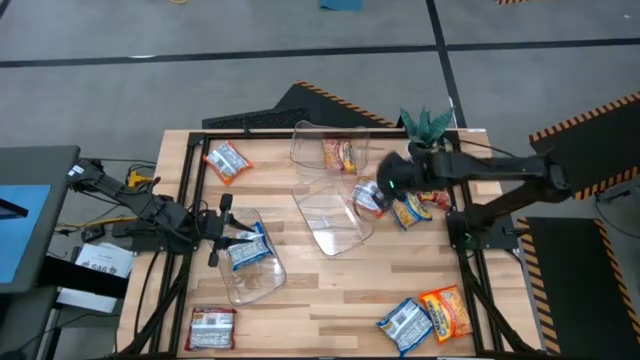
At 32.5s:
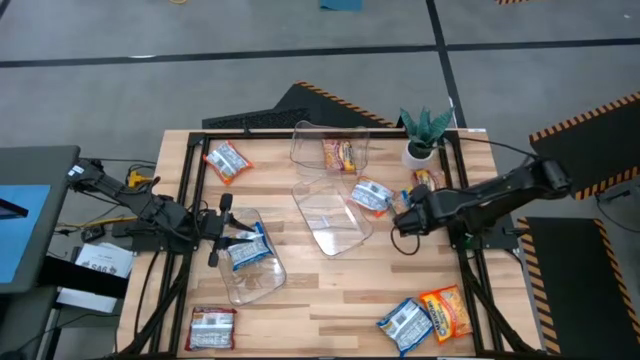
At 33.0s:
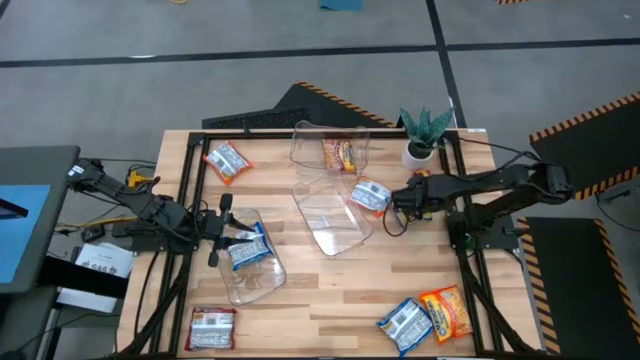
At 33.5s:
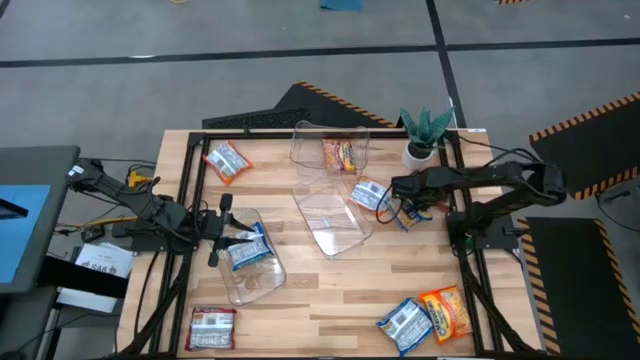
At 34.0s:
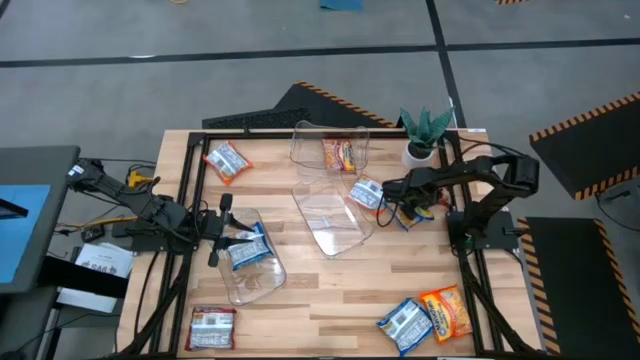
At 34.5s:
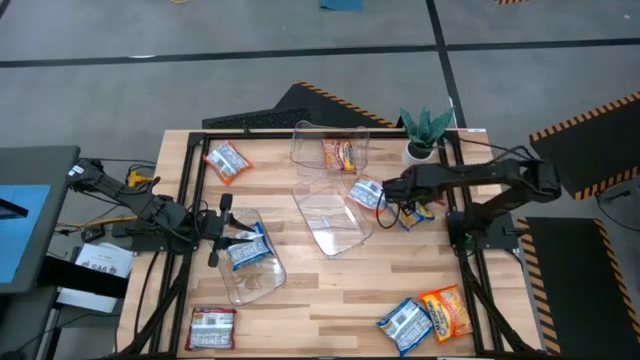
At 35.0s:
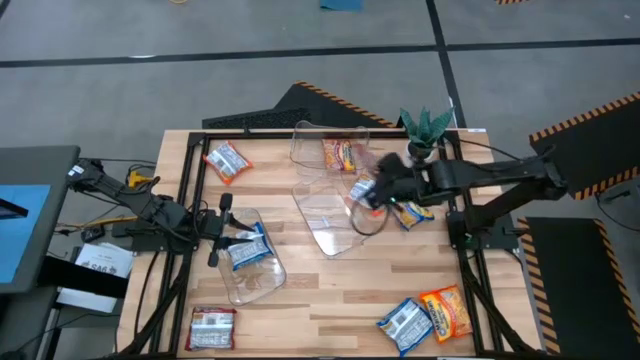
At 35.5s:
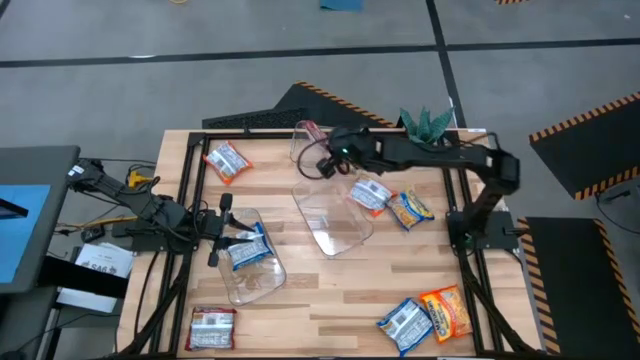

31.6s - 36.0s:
Task: Sort Maruchan noodles
Put the top red noodle pack into the top transparent bin

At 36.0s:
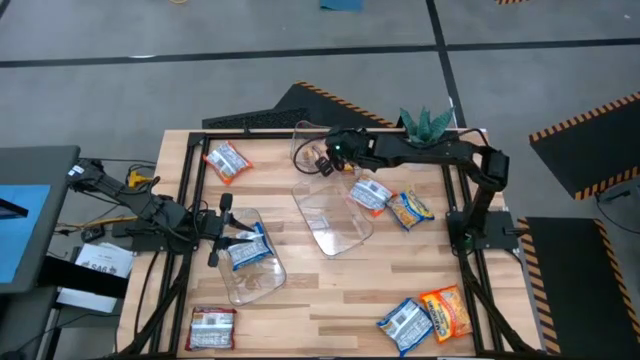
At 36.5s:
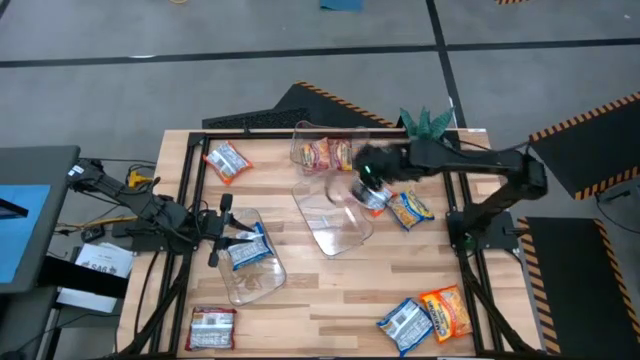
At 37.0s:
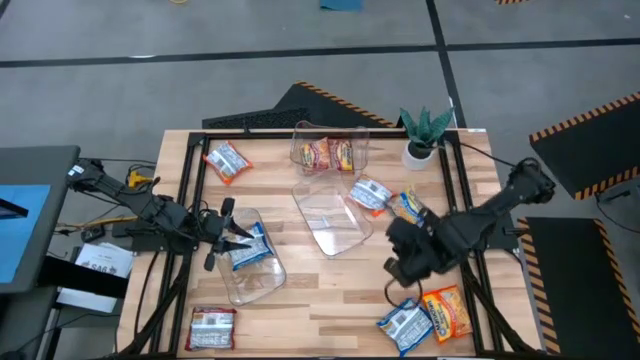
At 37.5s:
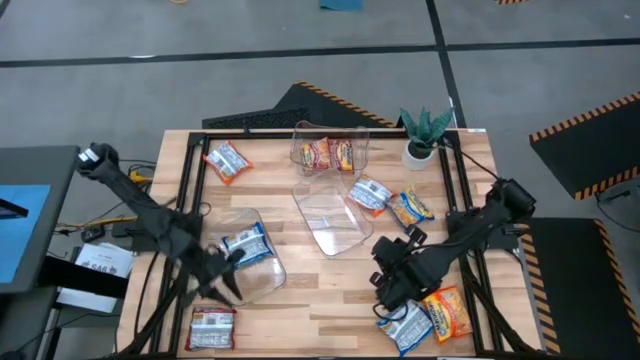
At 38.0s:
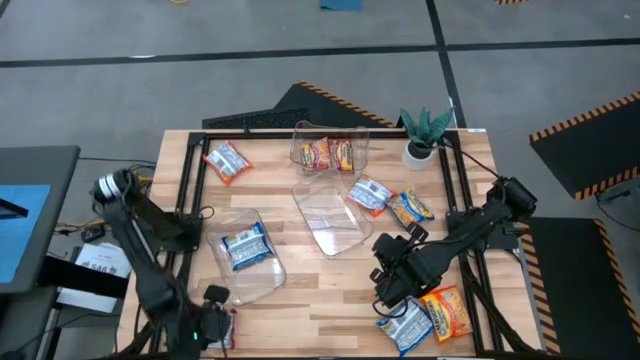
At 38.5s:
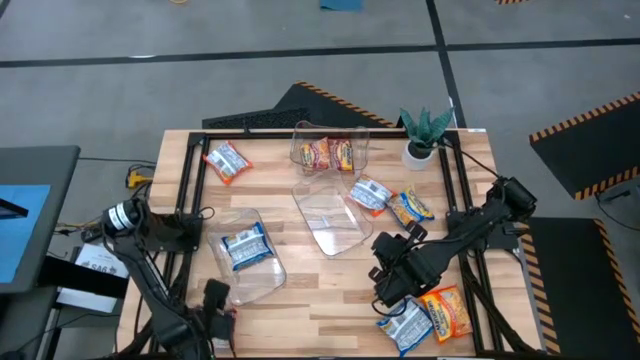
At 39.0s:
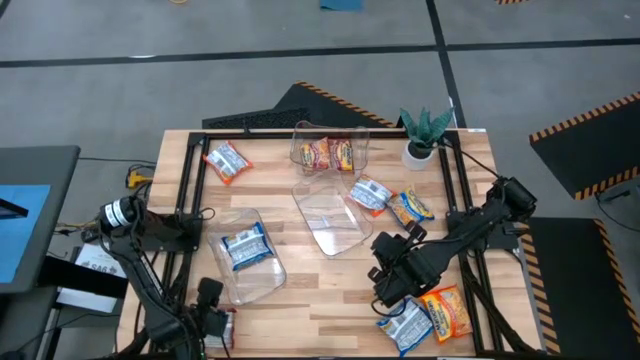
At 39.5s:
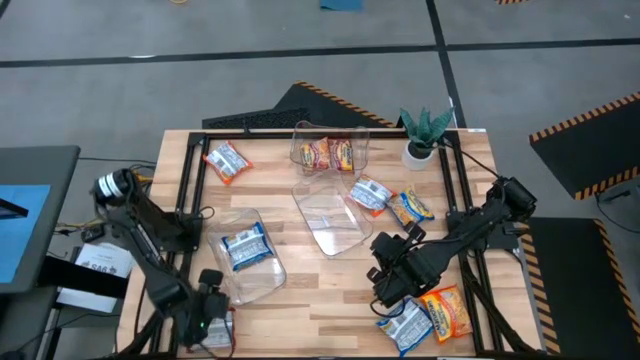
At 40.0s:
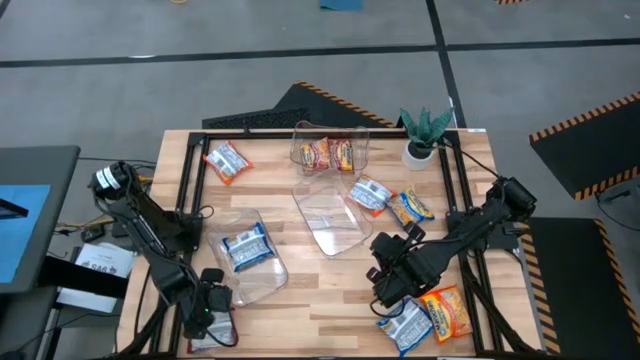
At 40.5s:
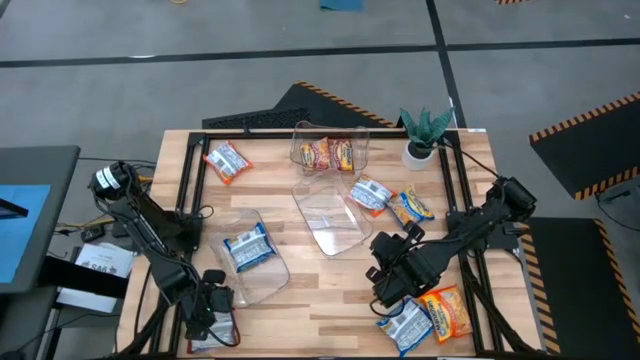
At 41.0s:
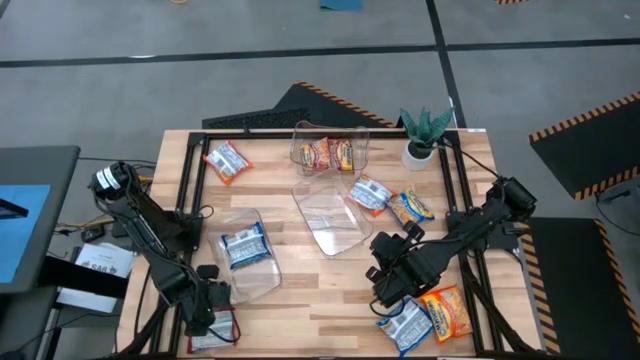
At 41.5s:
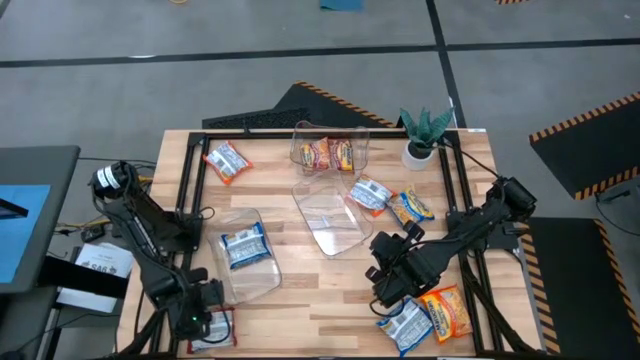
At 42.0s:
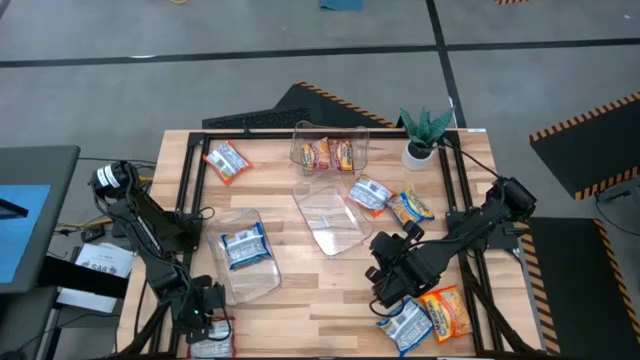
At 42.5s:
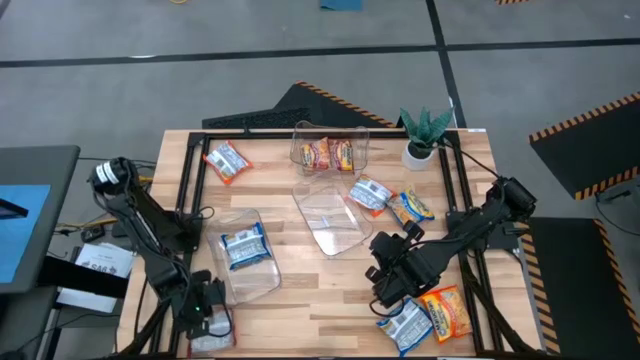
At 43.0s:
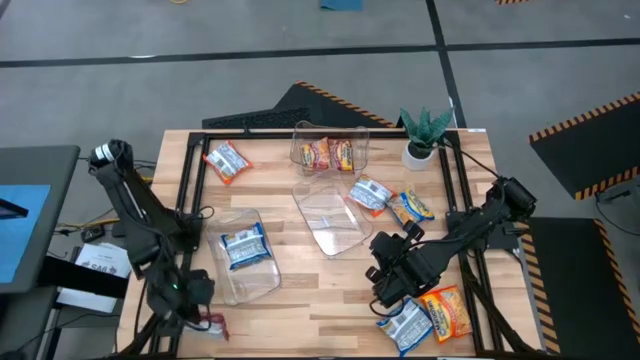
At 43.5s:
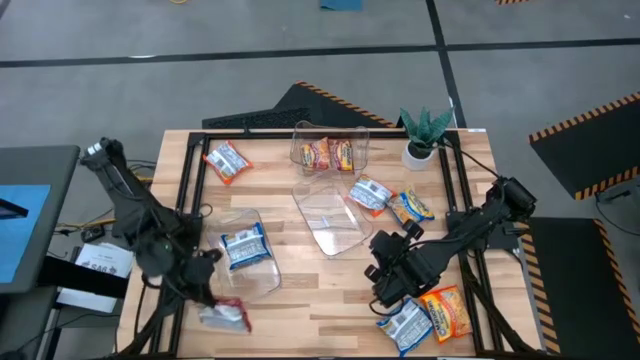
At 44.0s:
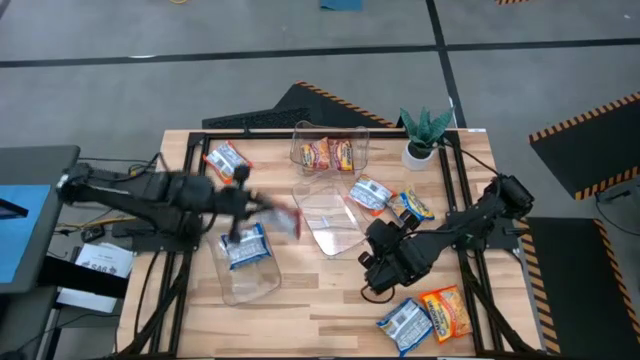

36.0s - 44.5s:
Put the red noodle pack into the top transparent bin

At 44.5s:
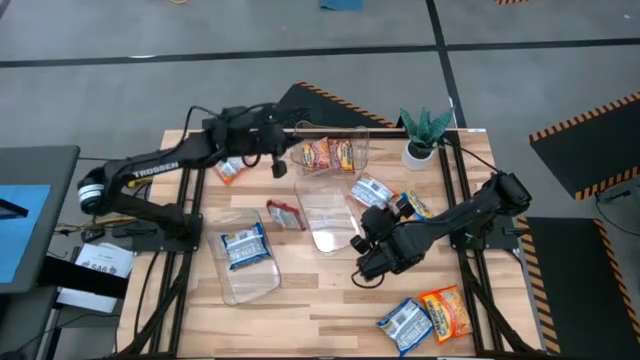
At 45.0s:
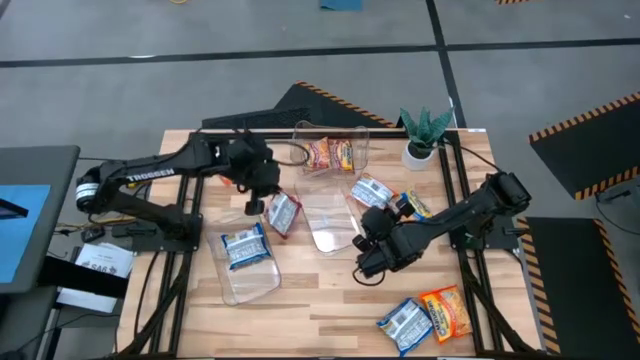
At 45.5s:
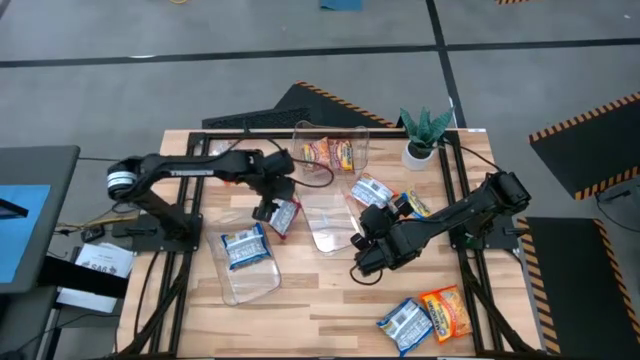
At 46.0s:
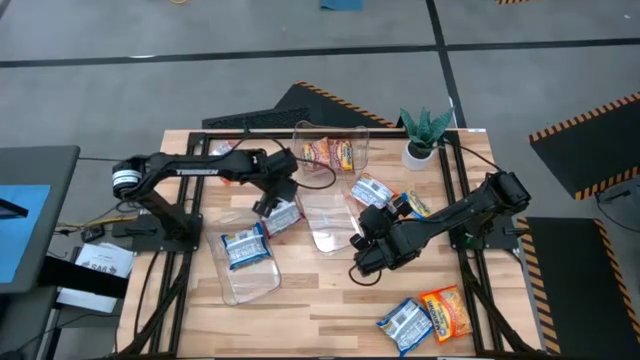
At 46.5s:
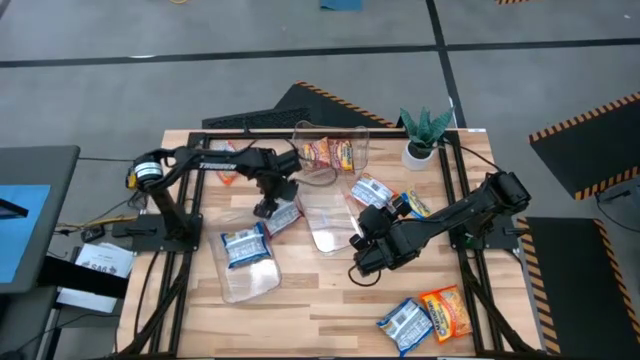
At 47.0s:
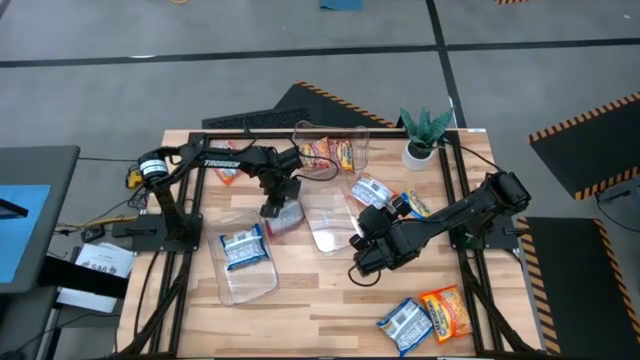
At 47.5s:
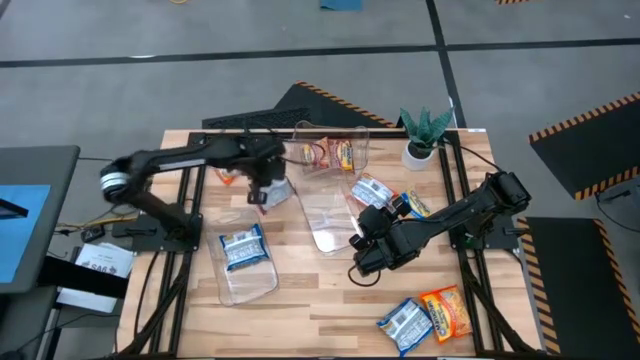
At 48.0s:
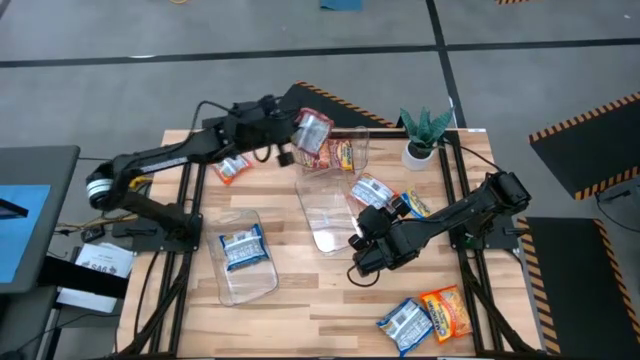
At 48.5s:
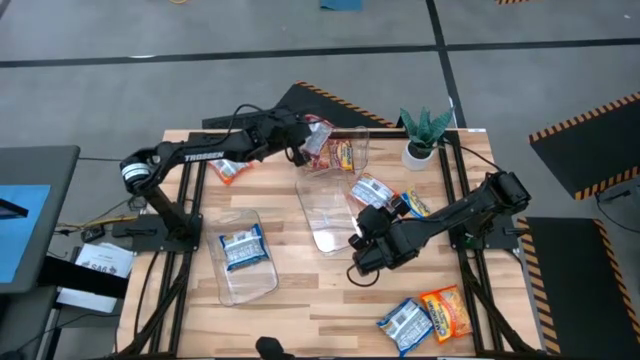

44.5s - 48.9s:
Put the red noodle pack into the top transparent bin

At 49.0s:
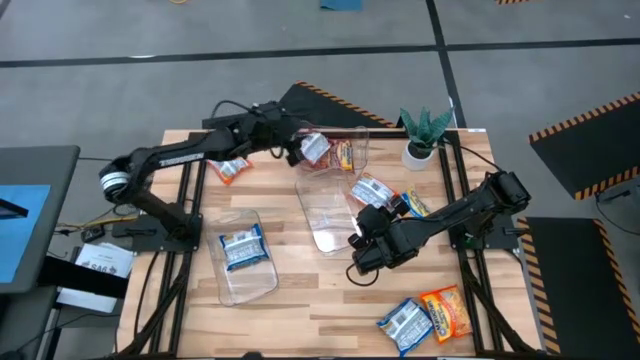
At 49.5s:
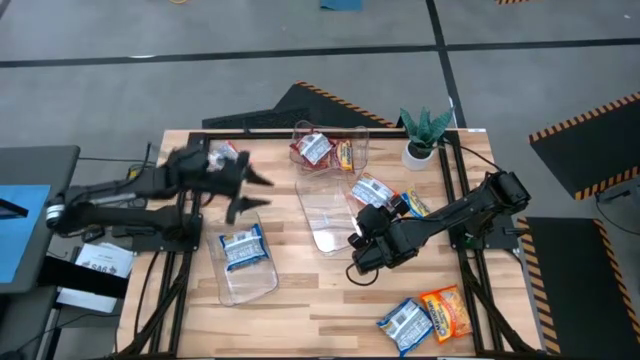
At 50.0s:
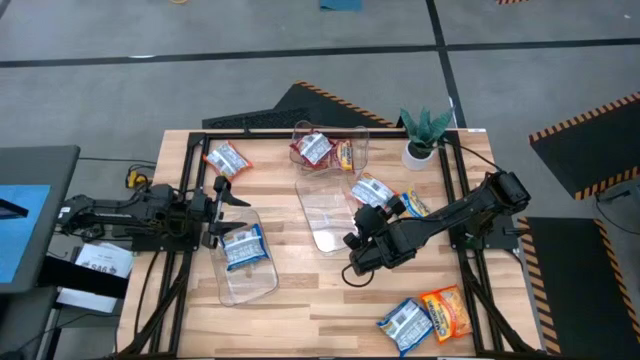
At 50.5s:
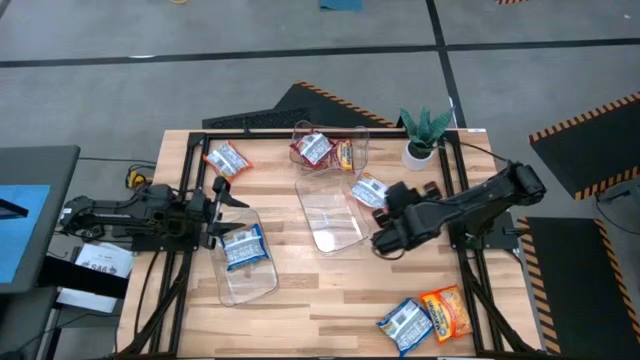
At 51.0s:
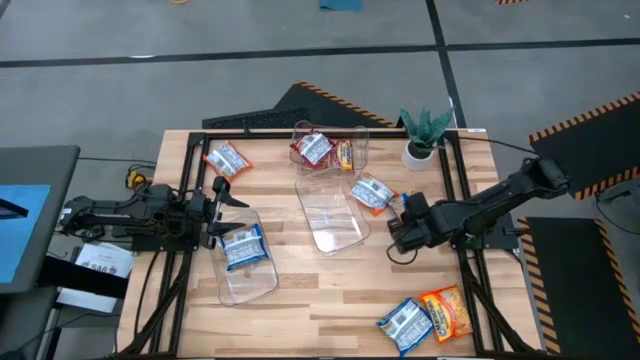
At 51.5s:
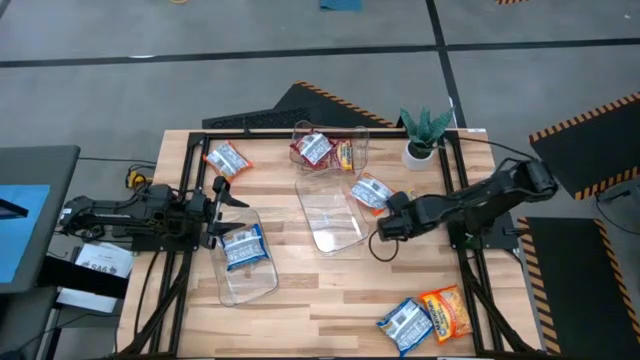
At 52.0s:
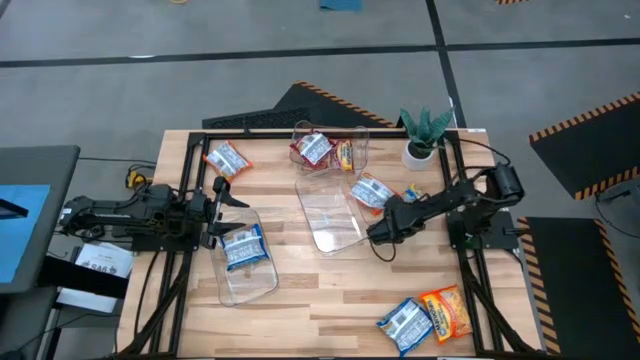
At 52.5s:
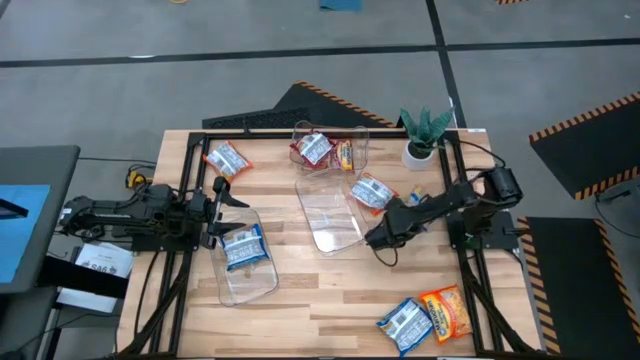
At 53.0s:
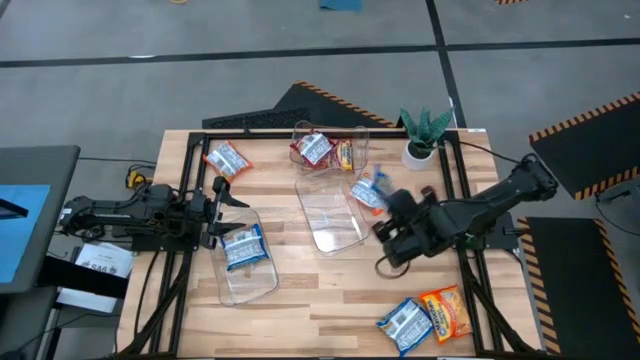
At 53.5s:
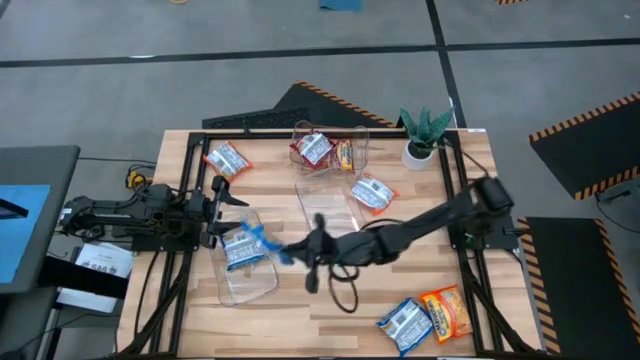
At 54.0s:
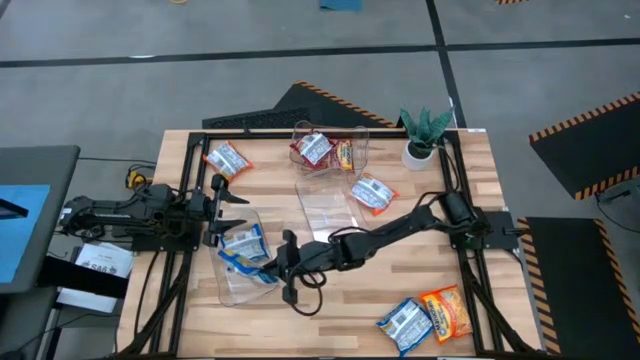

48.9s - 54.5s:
Put the top blue noodle pack into the bottom transparent bin
